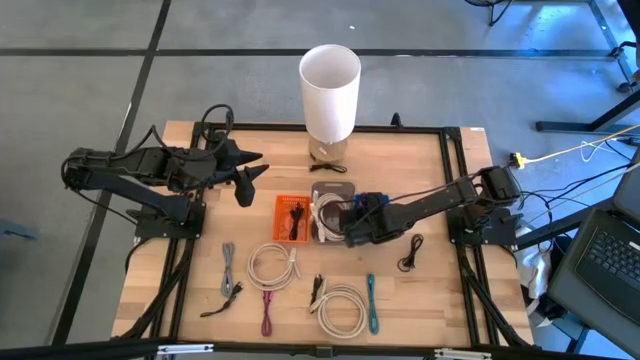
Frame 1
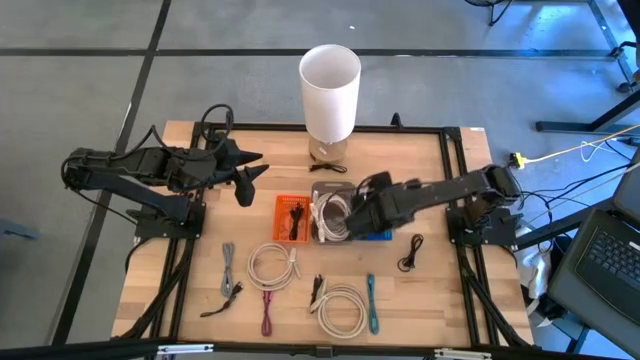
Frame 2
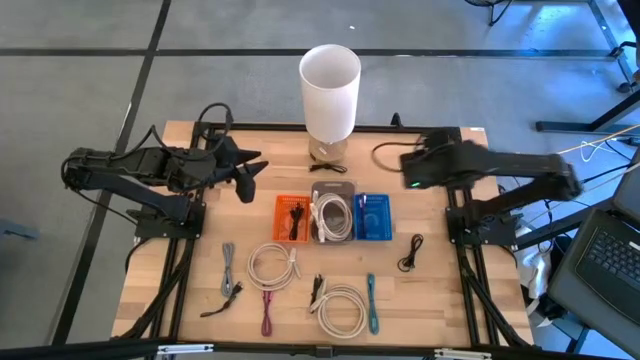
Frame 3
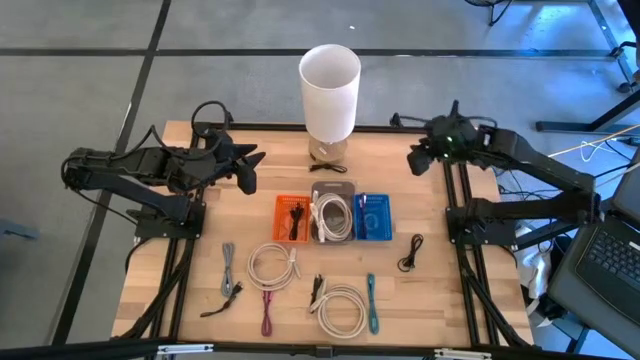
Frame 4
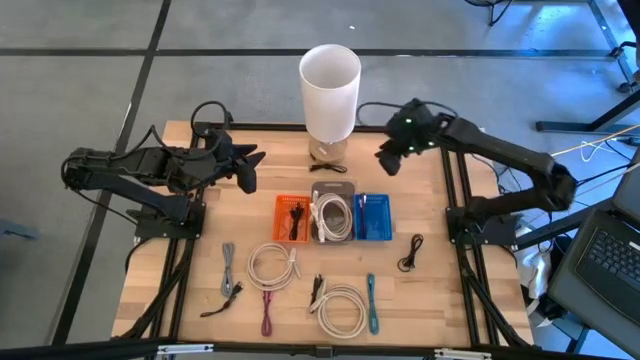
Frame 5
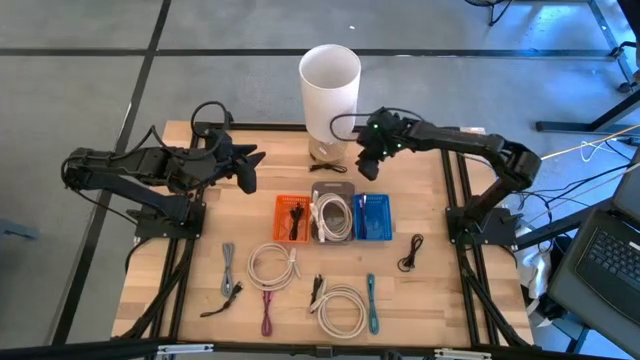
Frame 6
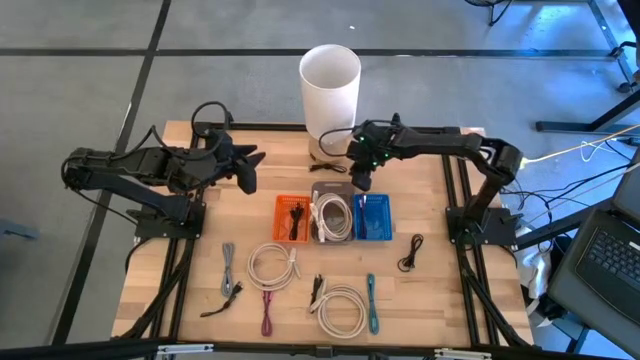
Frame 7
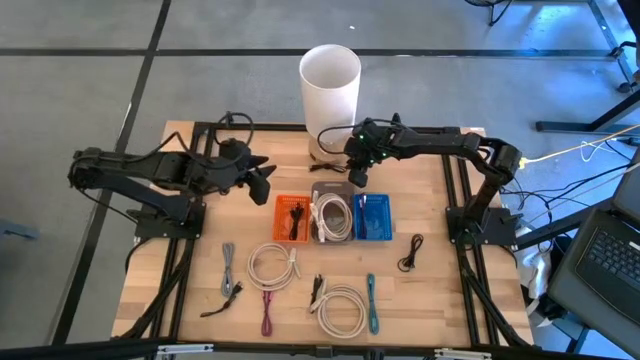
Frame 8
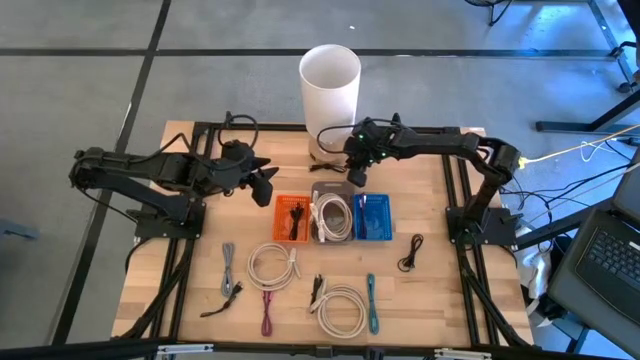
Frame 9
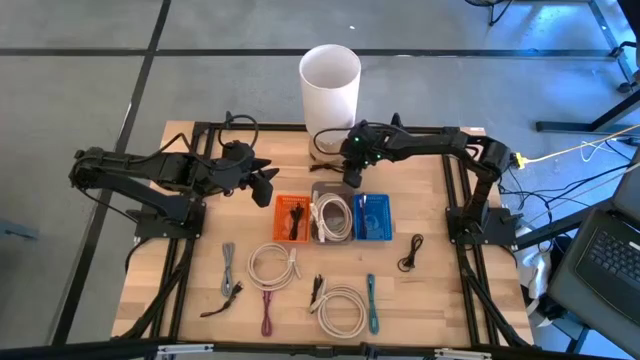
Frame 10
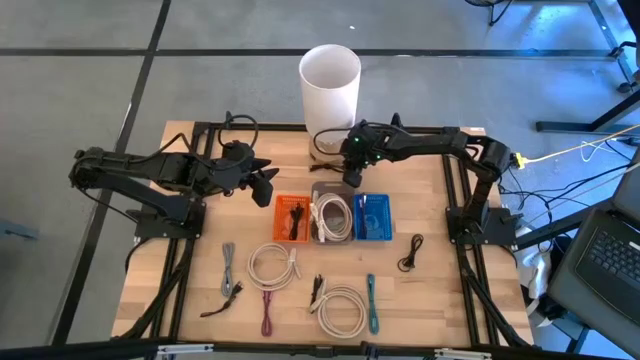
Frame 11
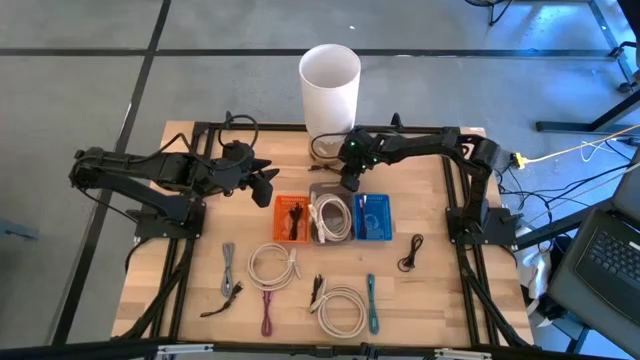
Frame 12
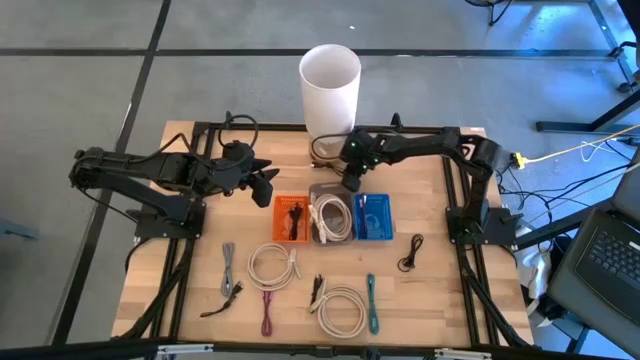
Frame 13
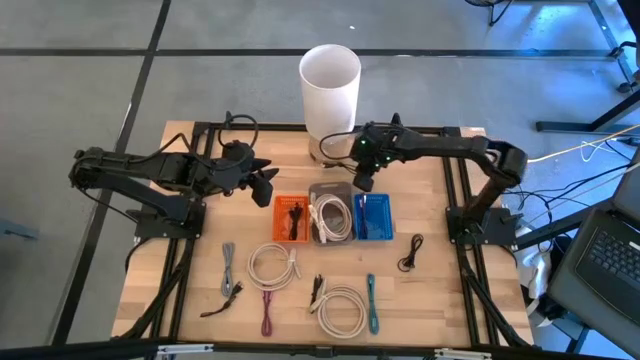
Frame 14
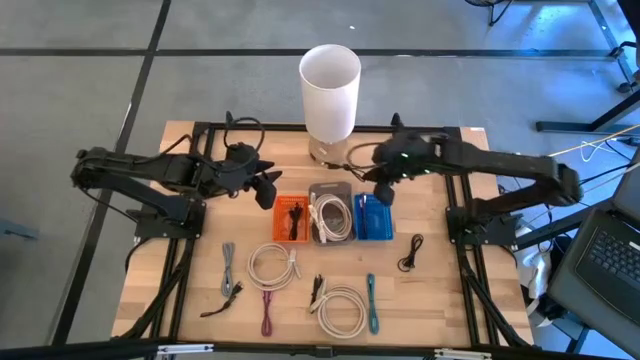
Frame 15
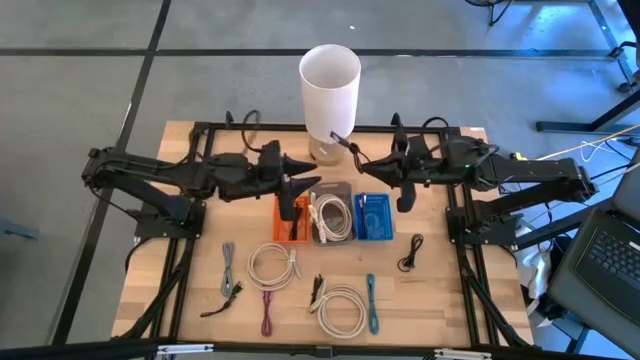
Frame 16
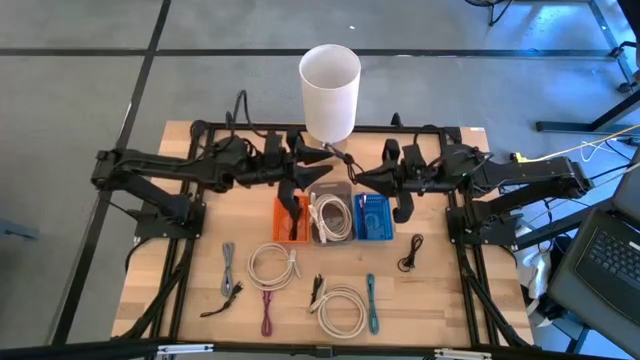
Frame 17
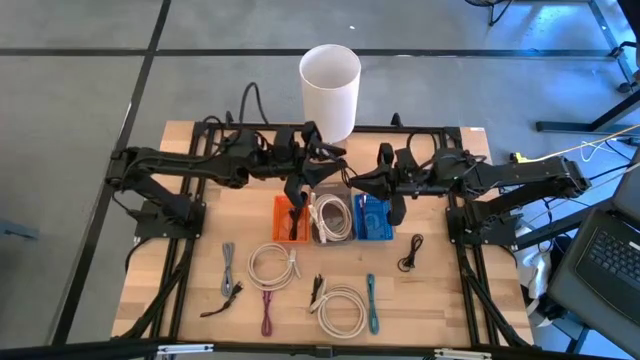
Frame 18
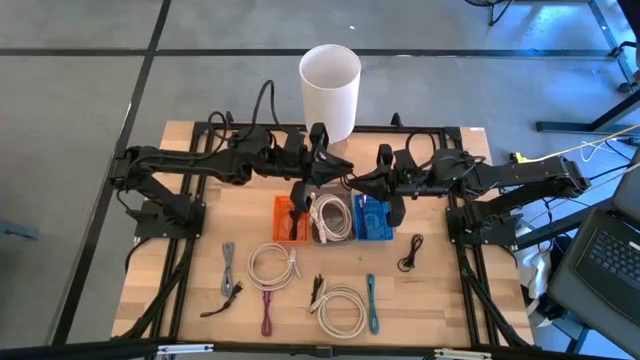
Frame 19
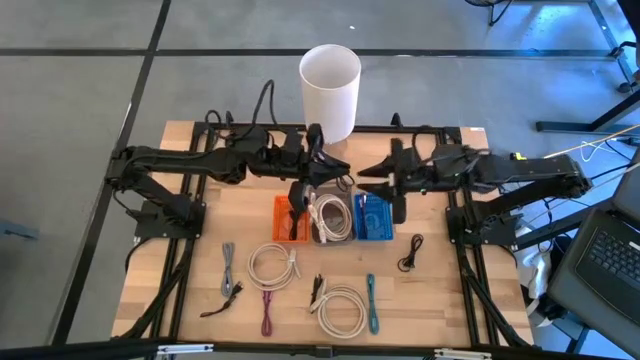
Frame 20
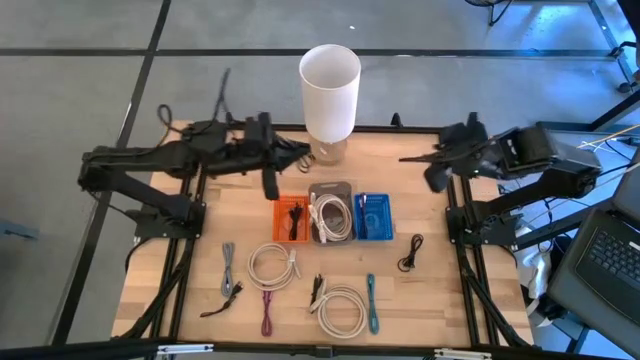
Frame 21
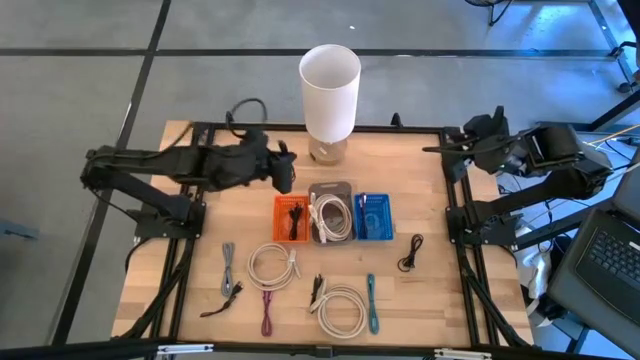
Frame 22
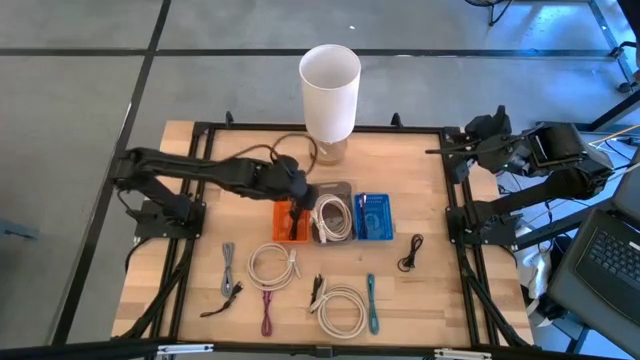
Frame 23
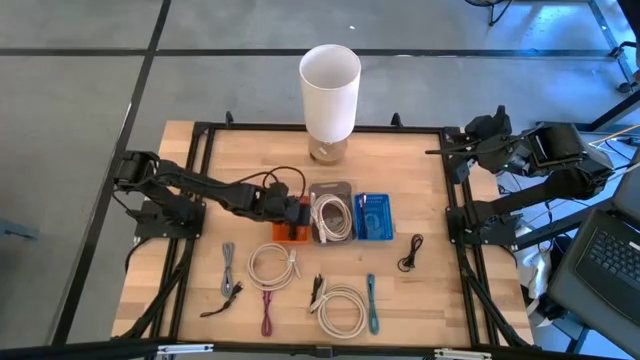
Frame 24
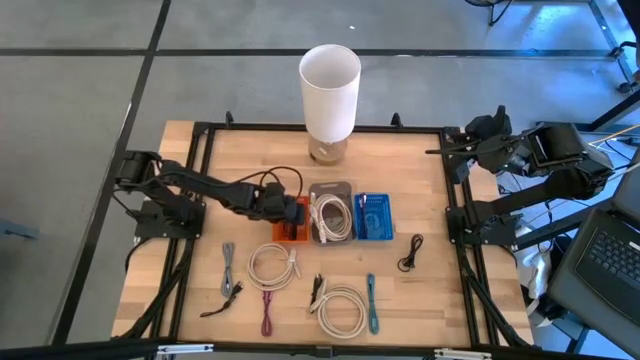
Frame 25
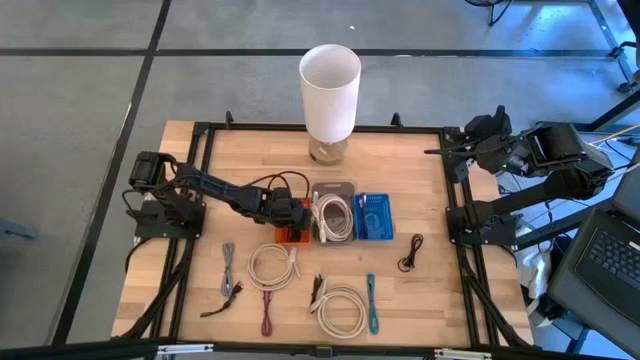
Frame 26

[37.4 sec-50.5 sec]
Task: Pick & Place USB Port
Put the black charger cable into the orange bin

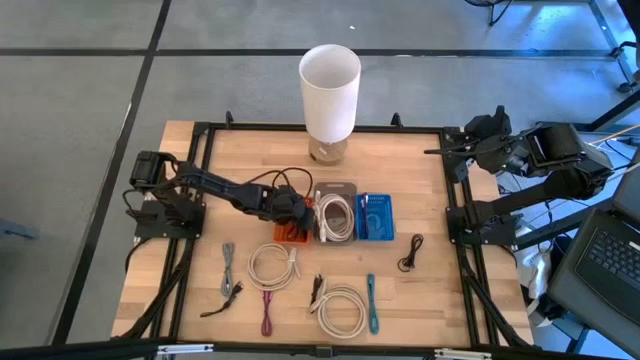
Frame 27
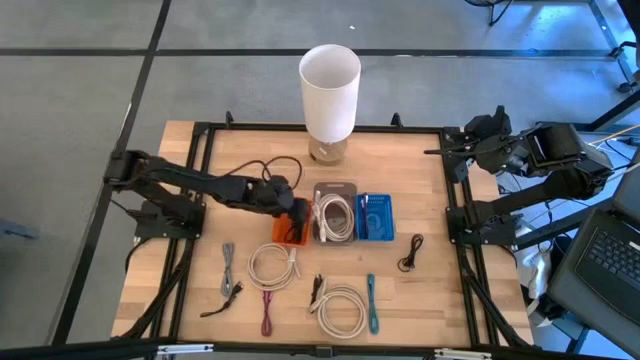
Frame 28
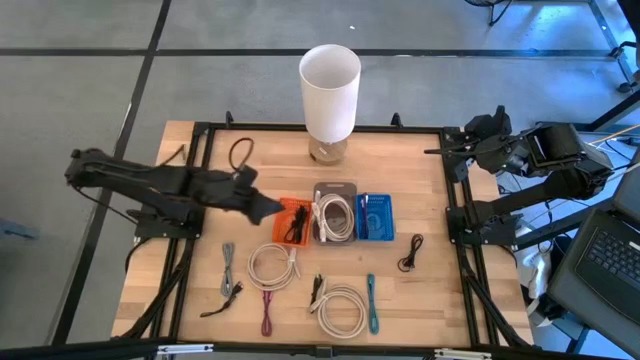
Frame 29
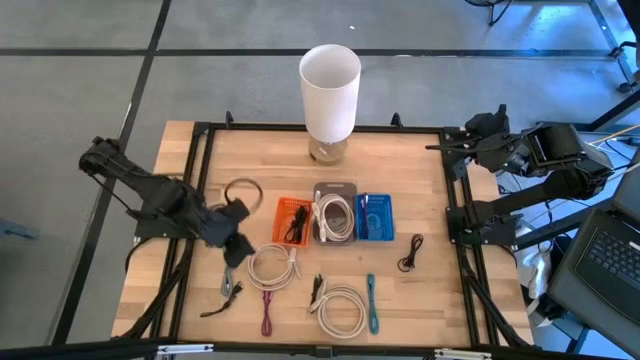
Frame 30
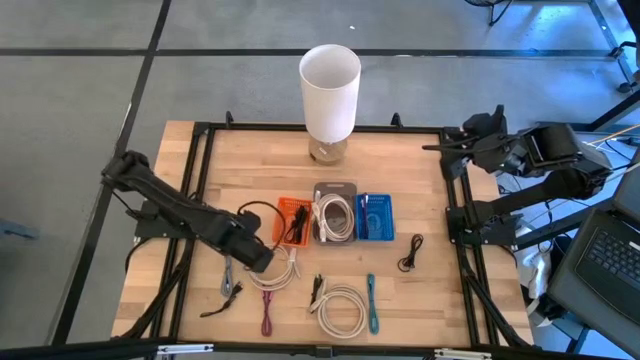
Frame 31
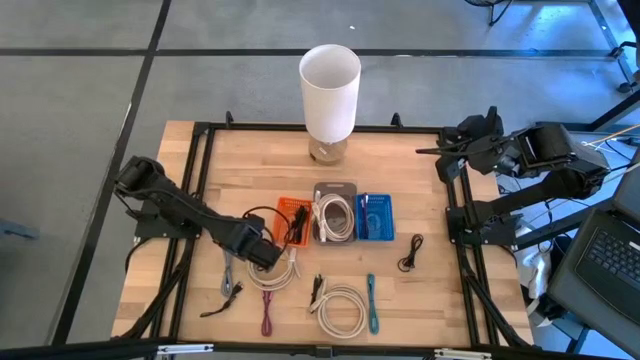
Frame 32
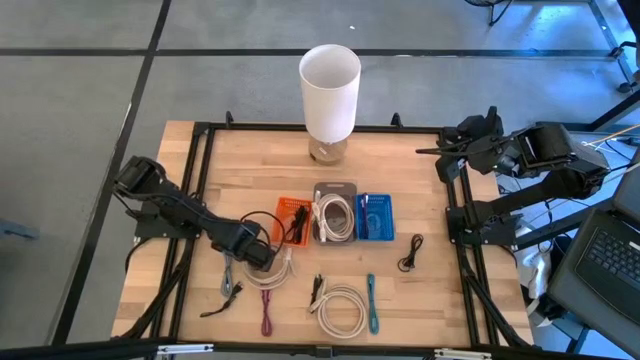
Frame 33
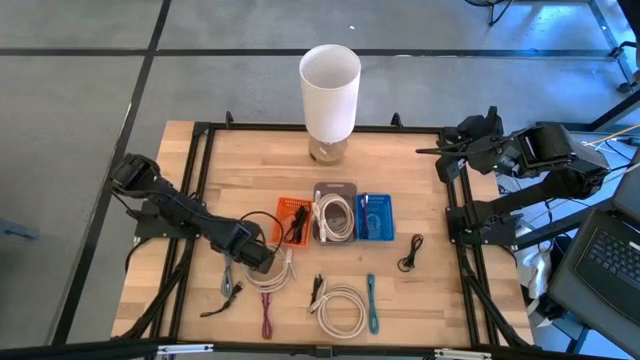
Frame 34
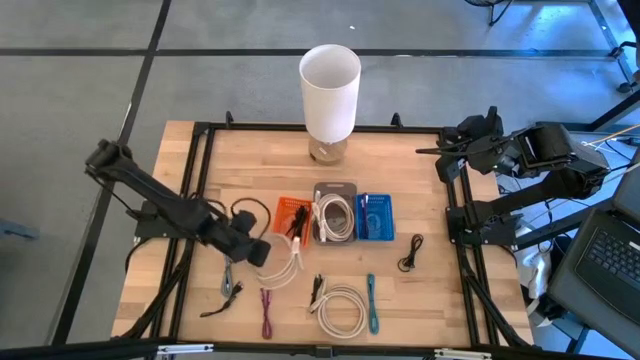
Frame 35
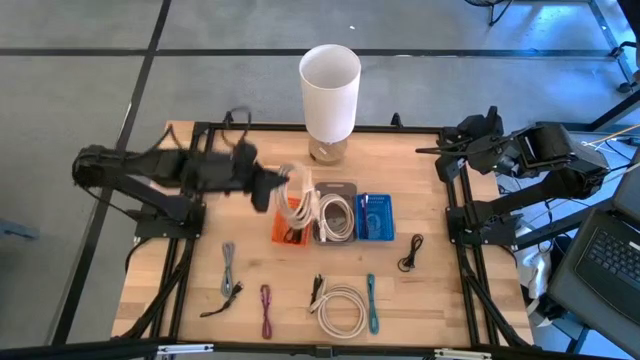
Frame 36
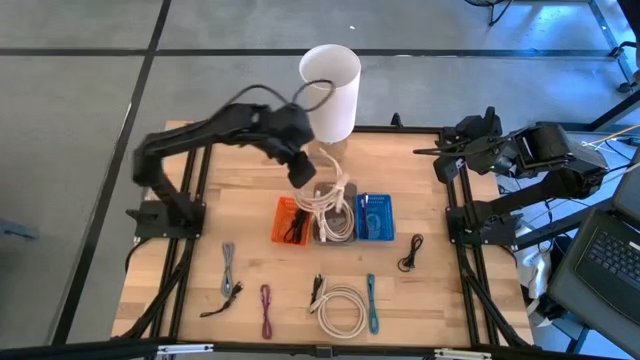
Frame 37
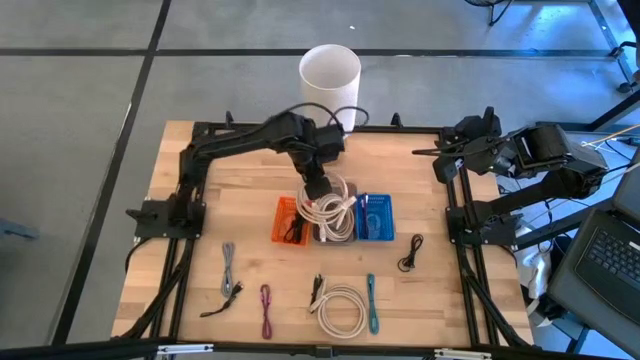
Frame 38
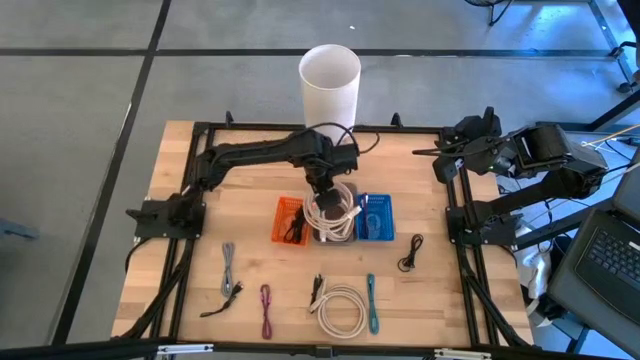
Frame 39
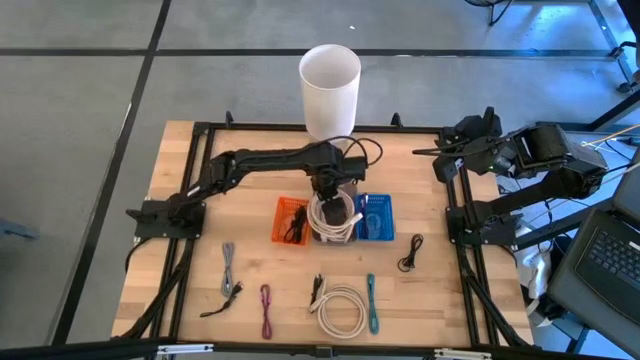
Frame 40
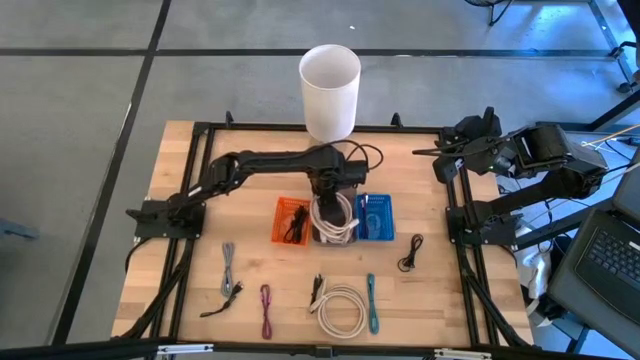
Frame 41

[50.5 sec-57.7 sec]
Put the brown HDMI cable into the black bin

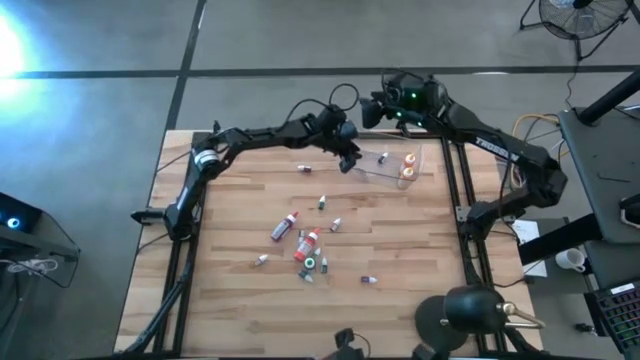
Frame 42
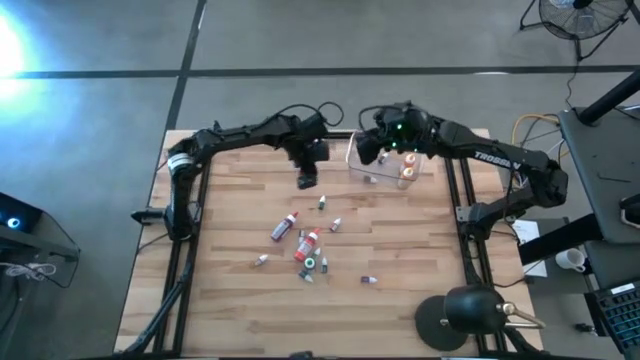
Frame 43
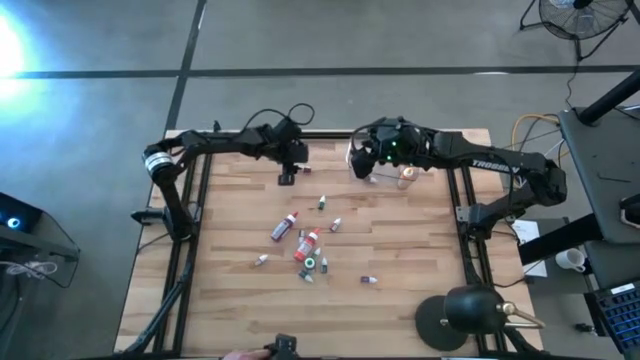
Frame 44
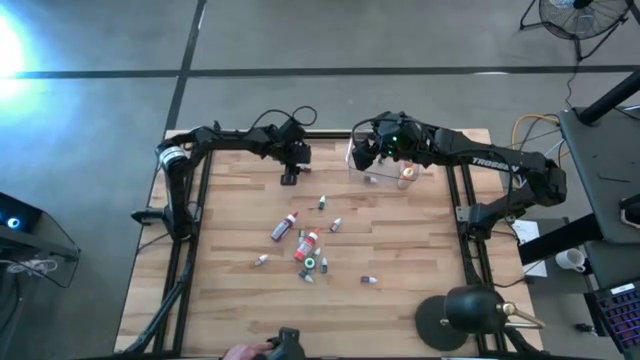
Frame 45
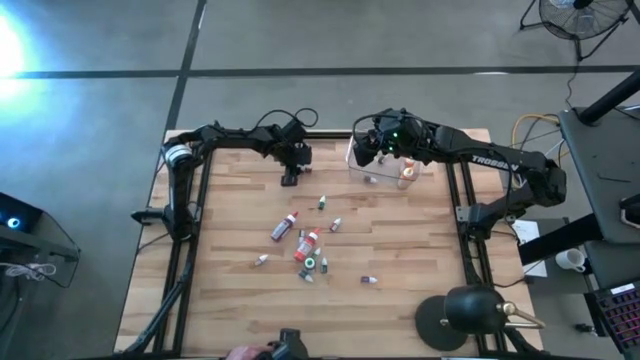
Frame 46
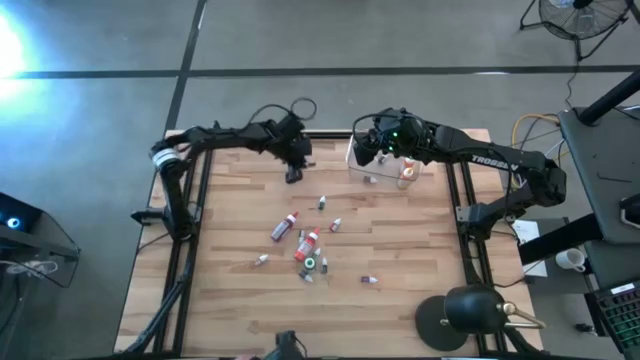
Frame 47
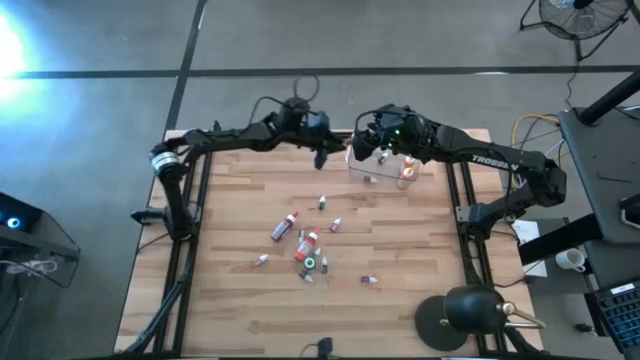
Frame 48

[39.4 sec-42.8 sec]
Task: Pick & Place food coloring
Put the small red food coloring bottle into the transparent bin
